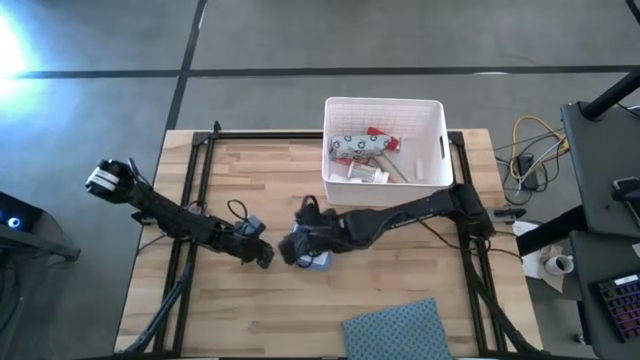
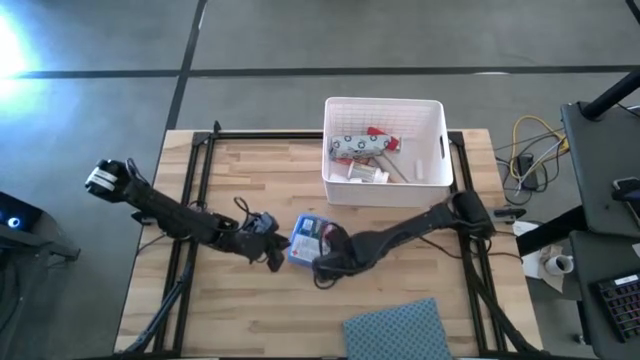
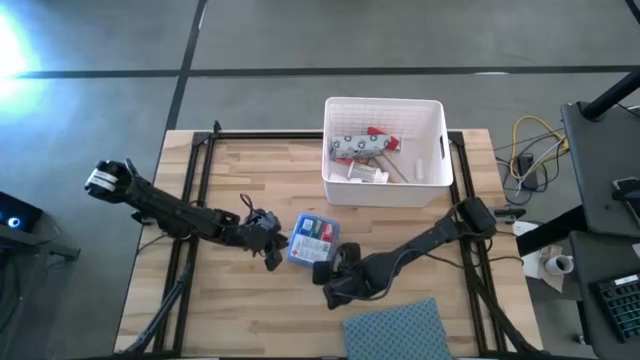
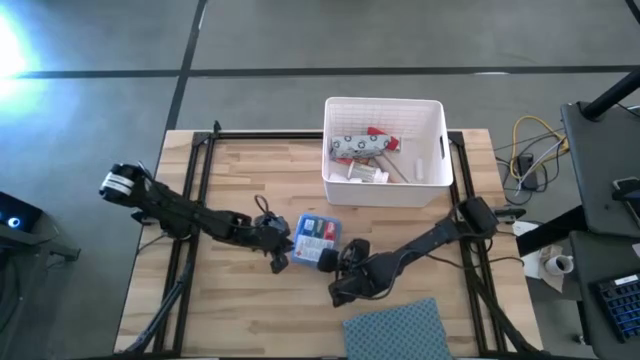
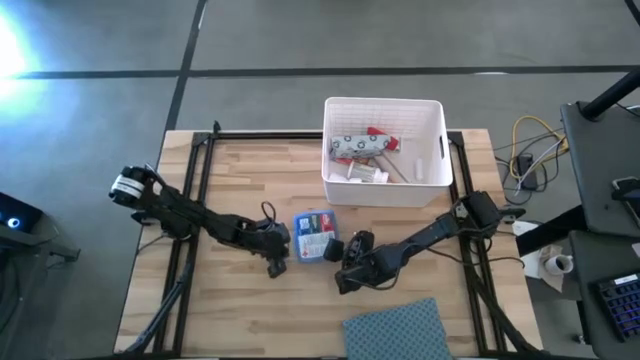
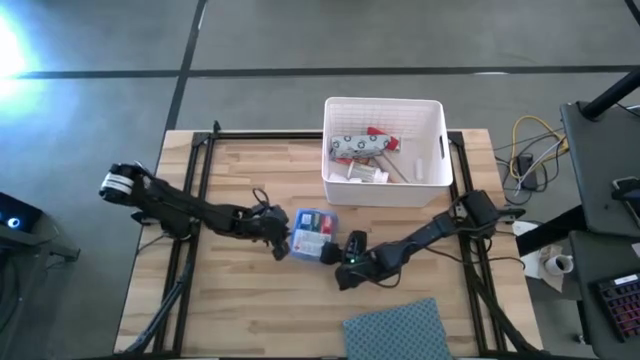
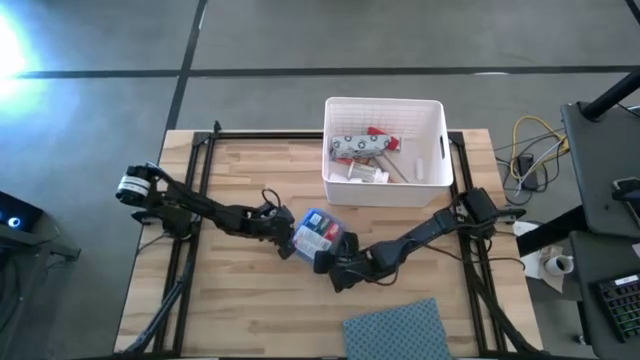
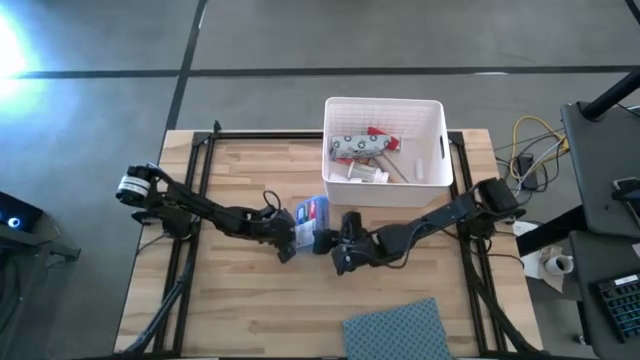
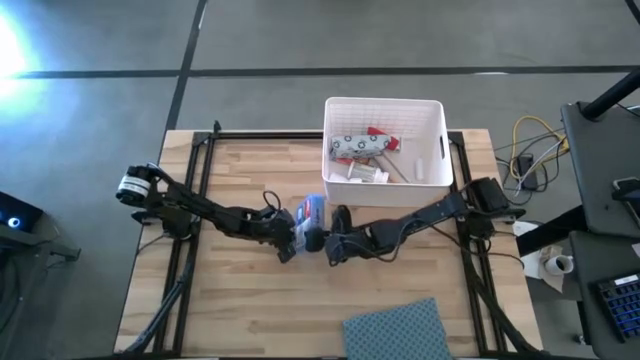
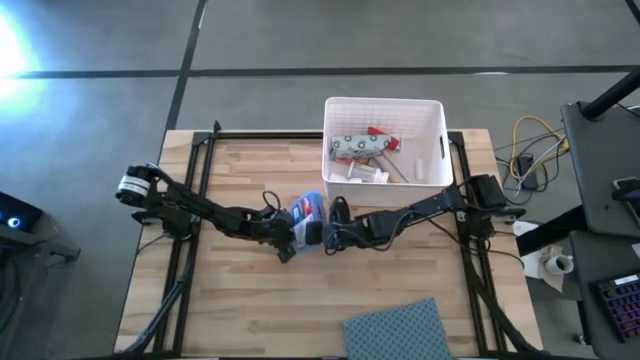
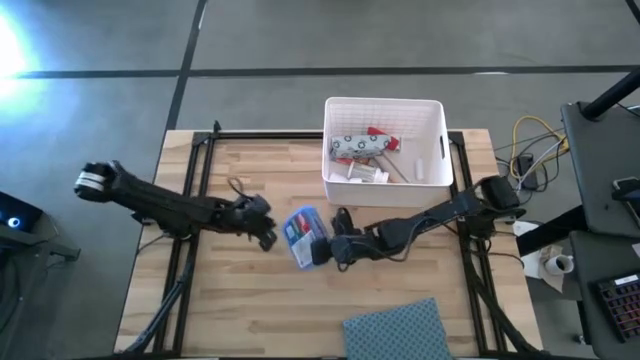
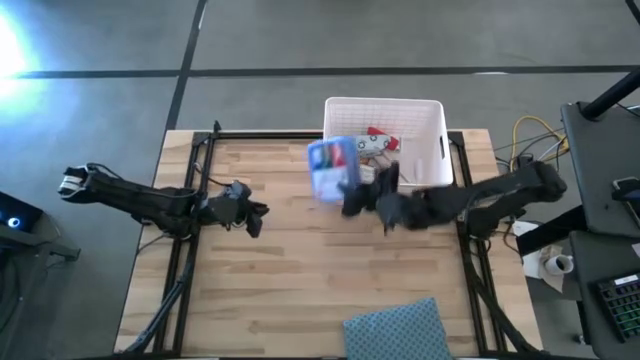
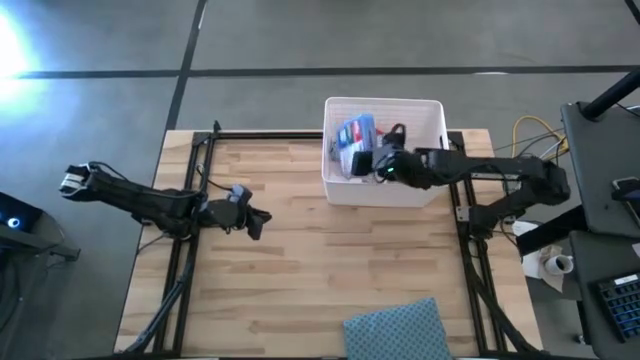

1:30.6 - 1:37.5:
Task: Pick & place medical supplies in basket/bin
Put the blue first aid kit box into the white bin

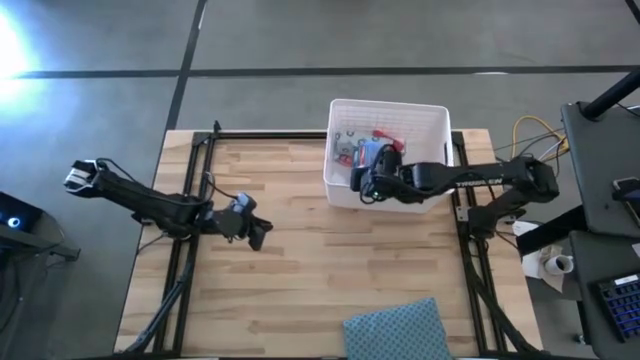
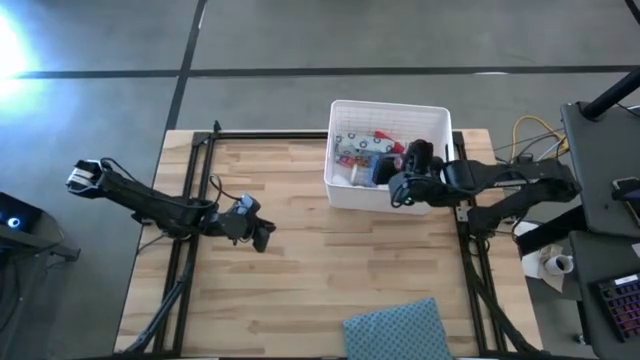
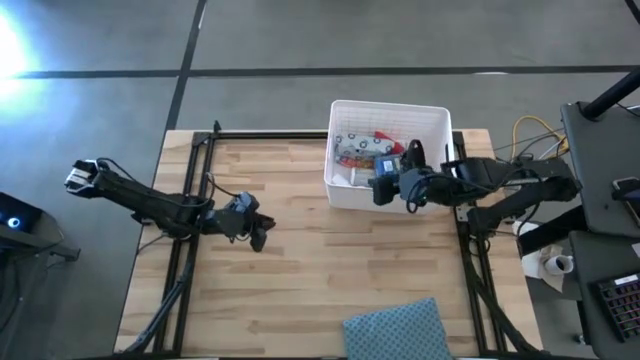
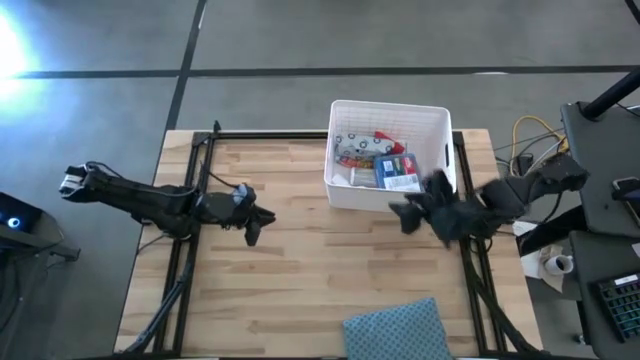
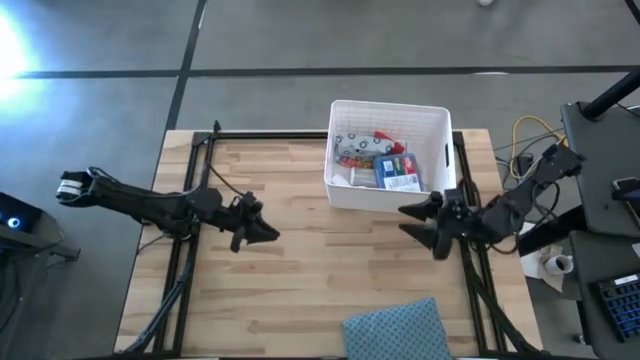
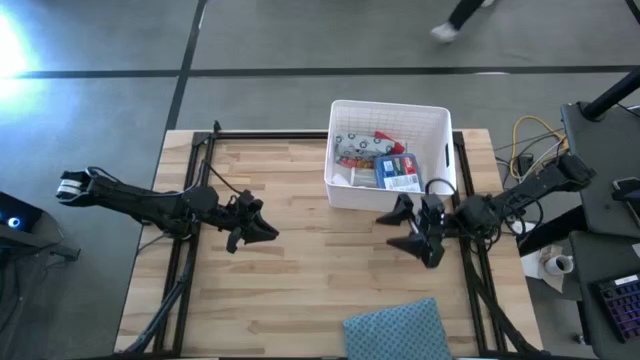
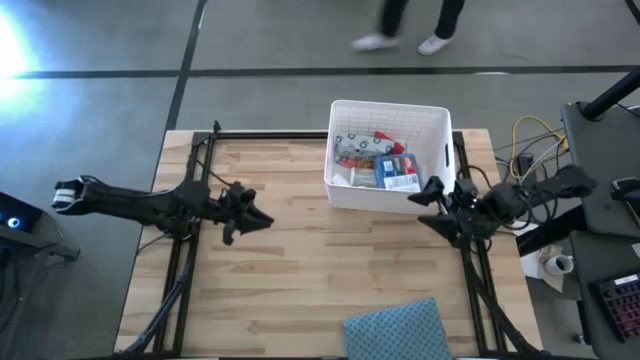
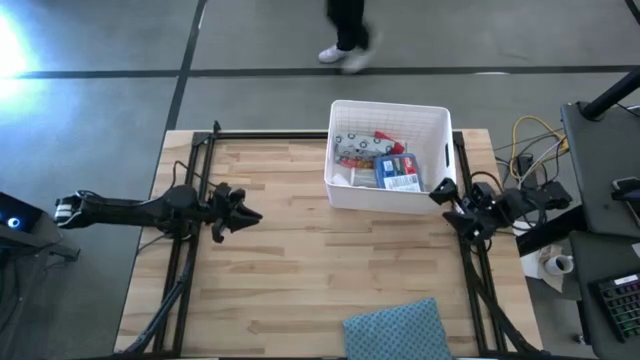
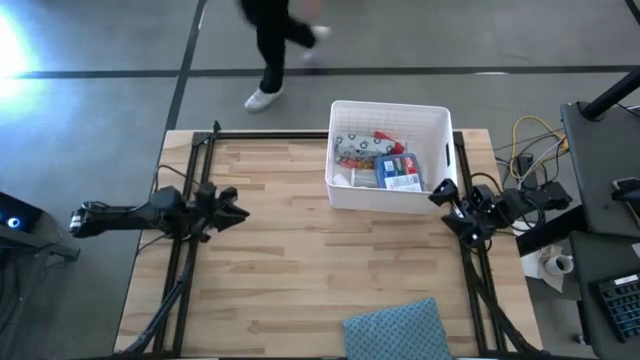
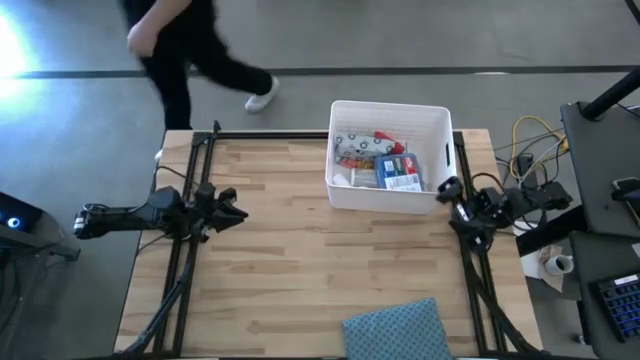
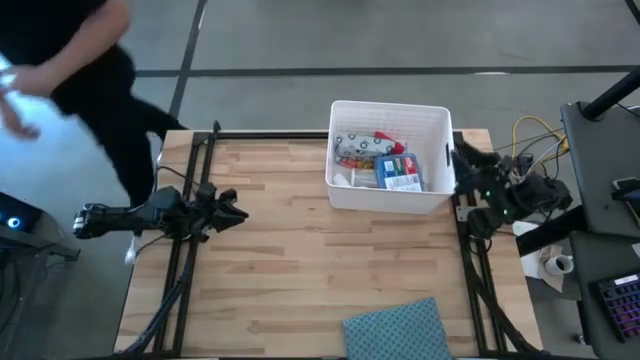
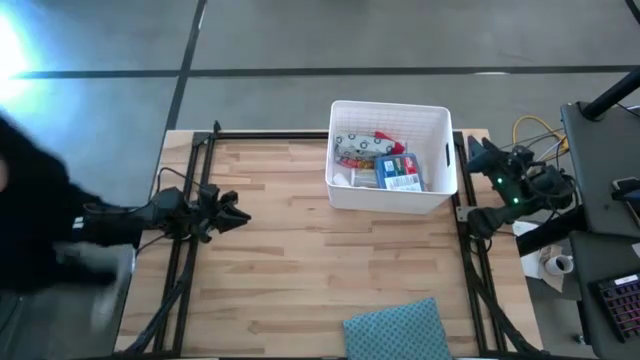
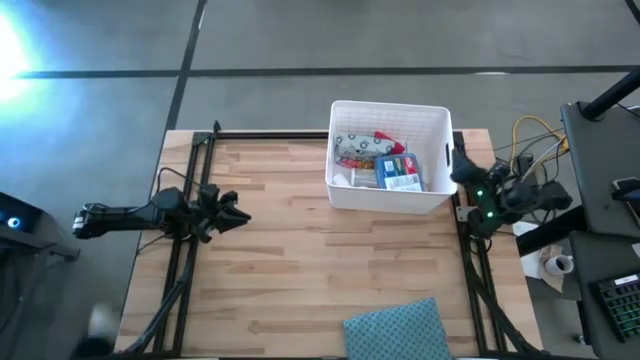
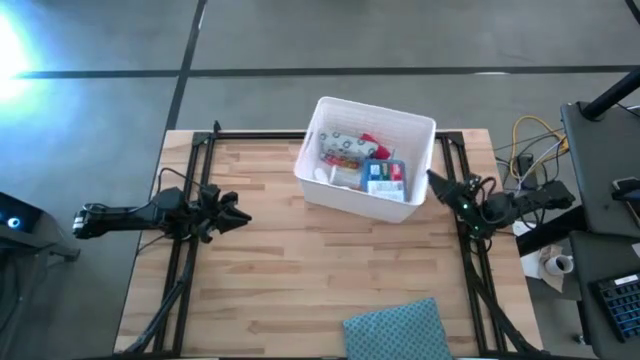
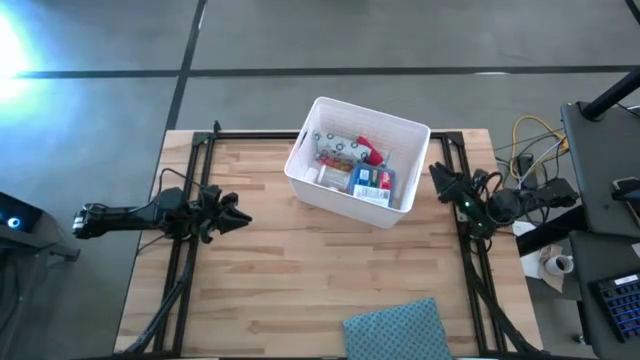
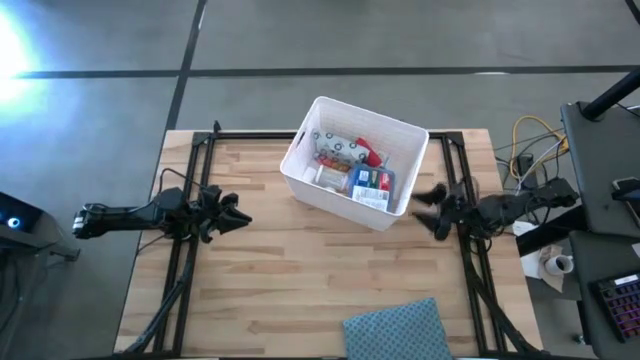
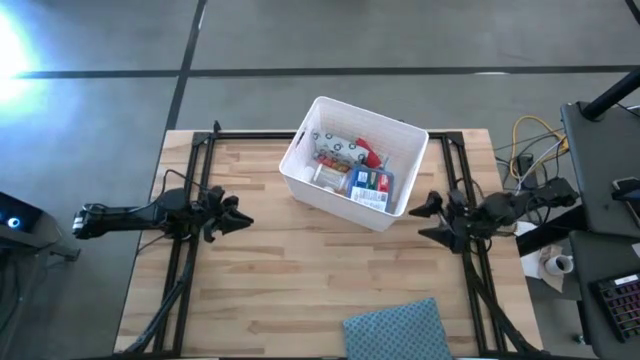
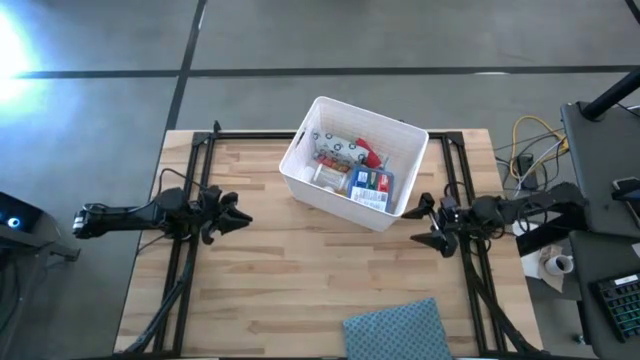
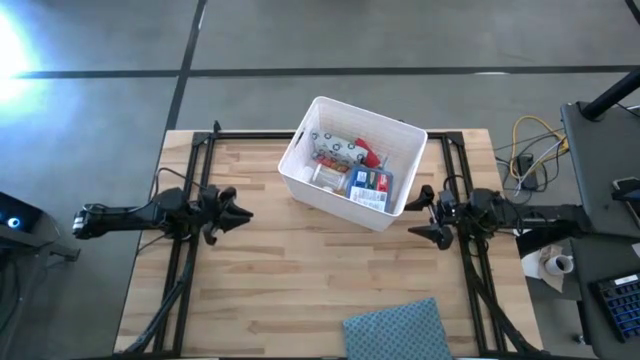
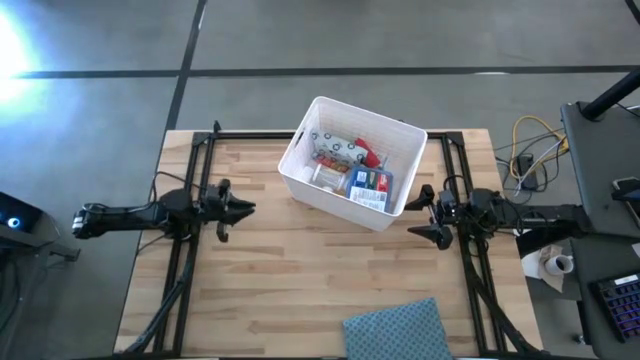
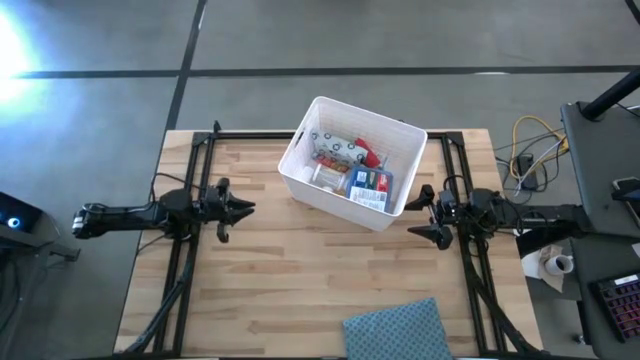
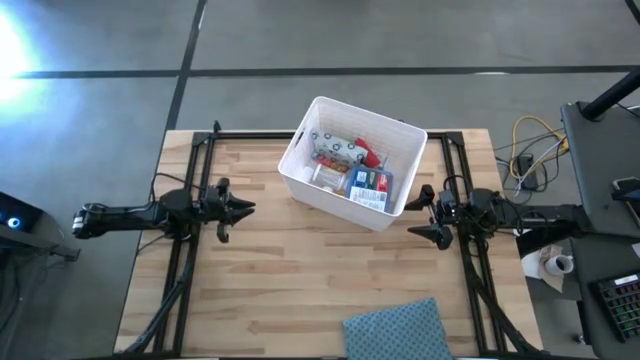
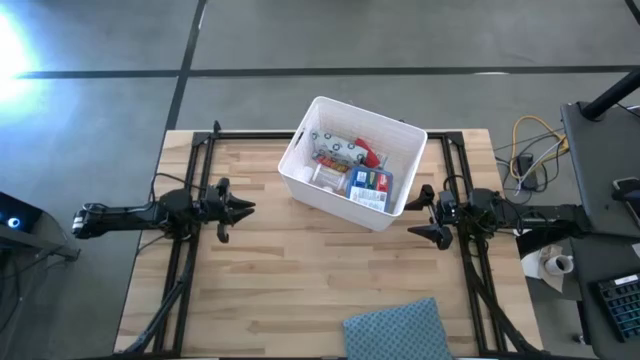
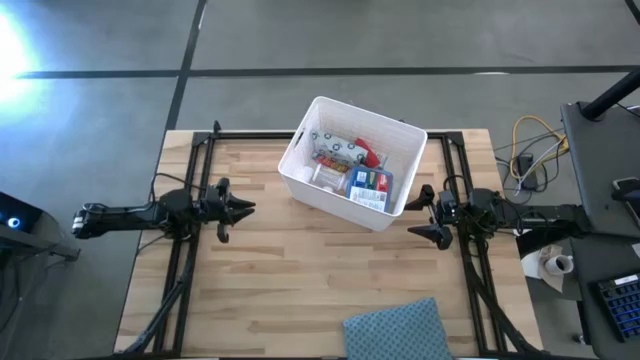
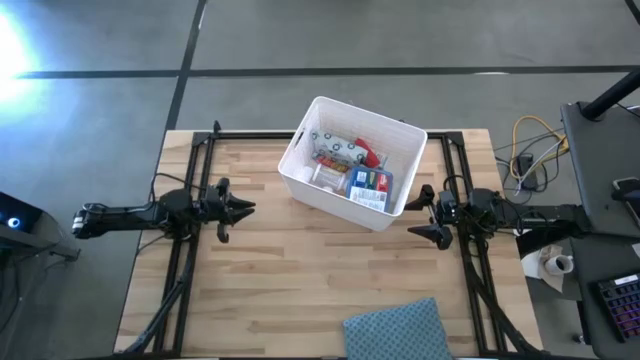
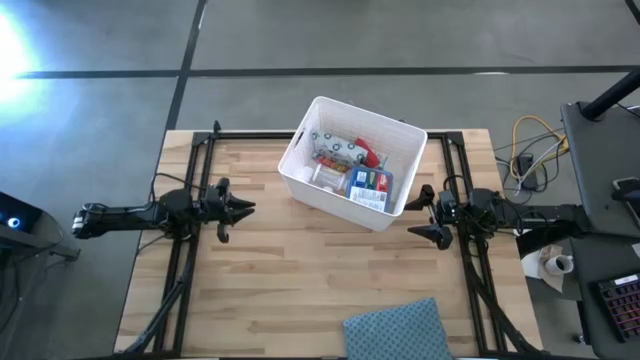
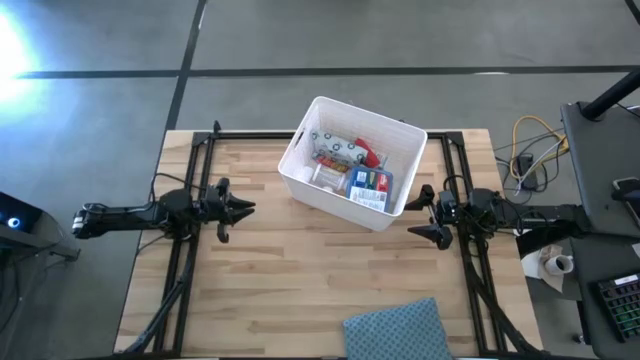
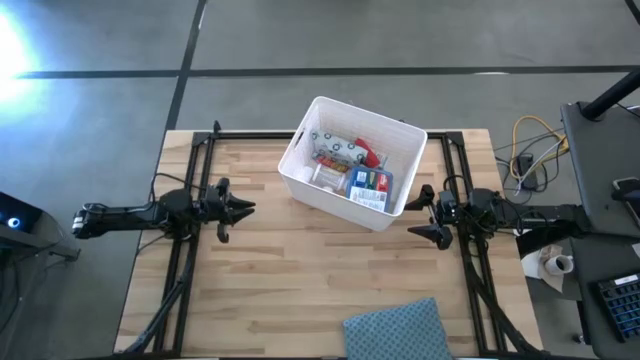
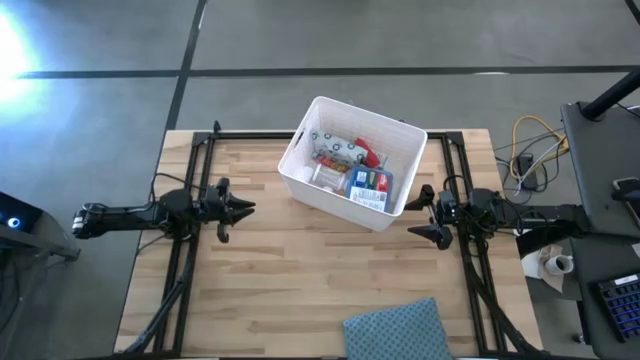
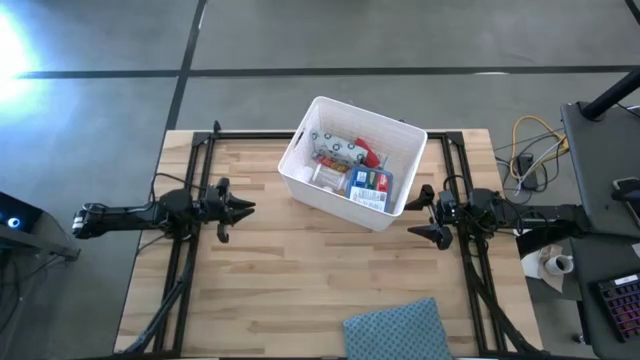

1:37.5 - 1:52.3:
Return to Home Position
